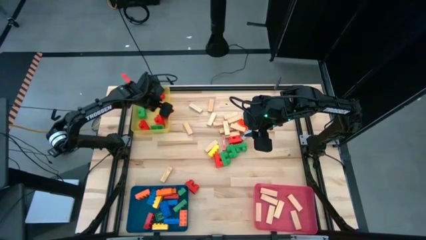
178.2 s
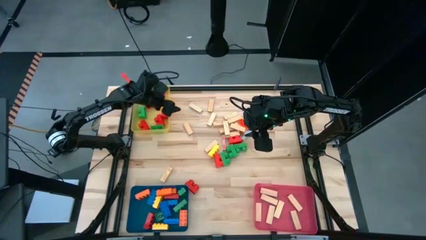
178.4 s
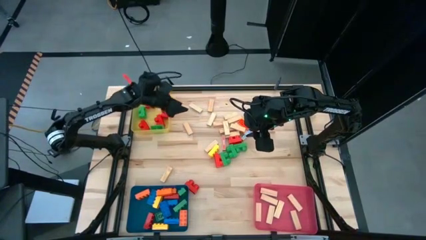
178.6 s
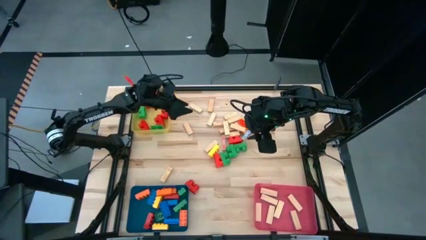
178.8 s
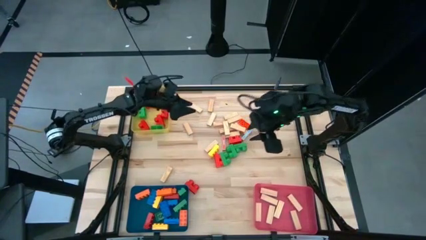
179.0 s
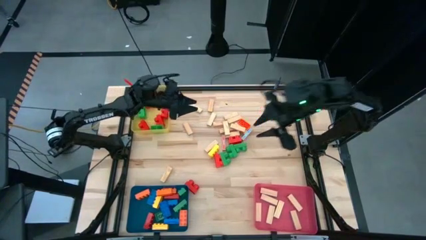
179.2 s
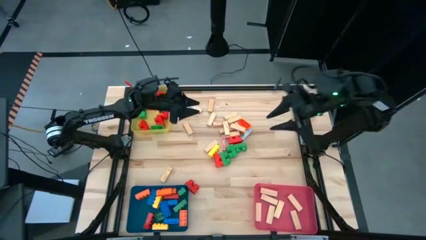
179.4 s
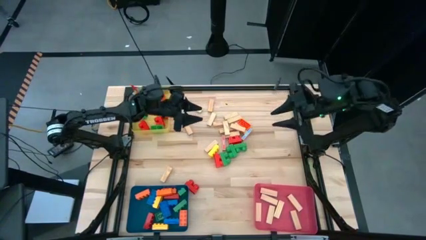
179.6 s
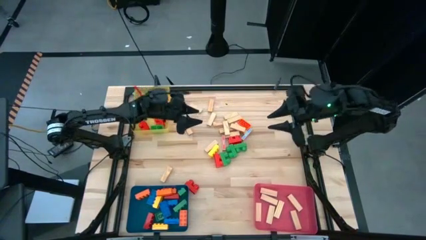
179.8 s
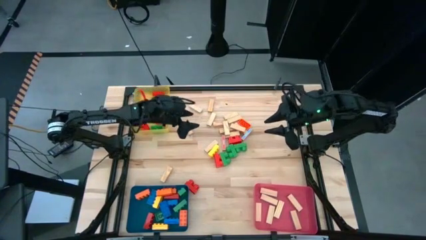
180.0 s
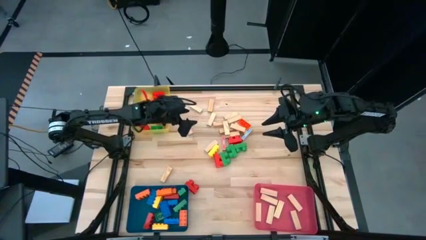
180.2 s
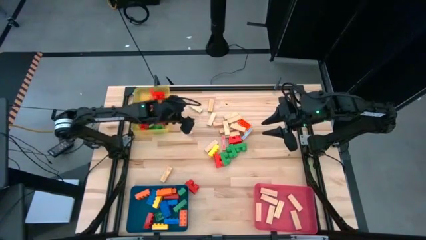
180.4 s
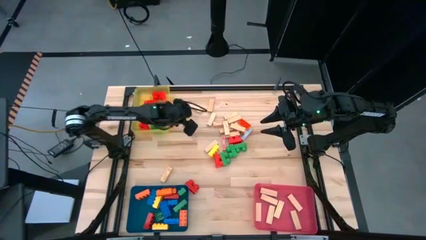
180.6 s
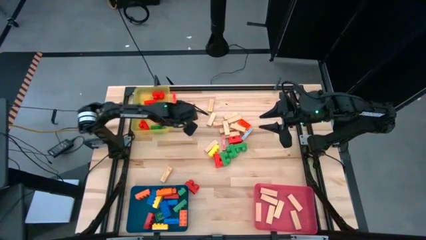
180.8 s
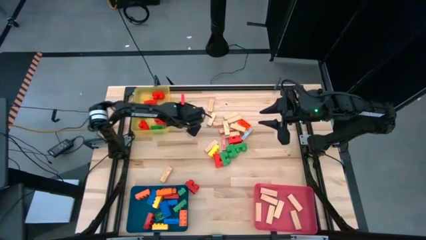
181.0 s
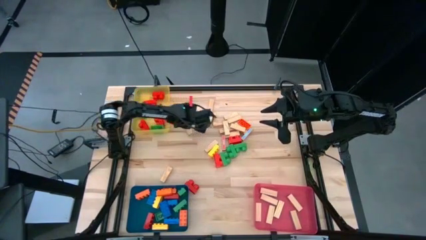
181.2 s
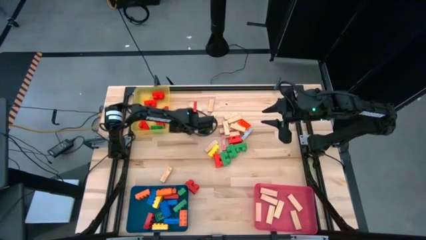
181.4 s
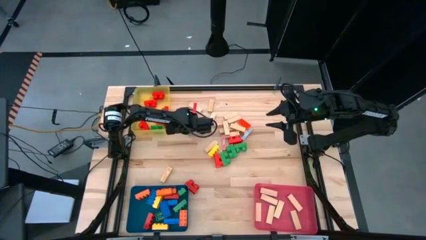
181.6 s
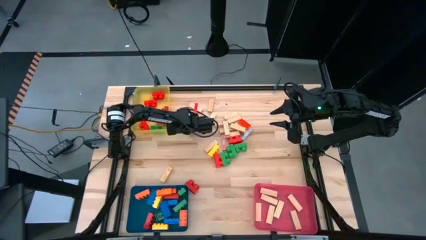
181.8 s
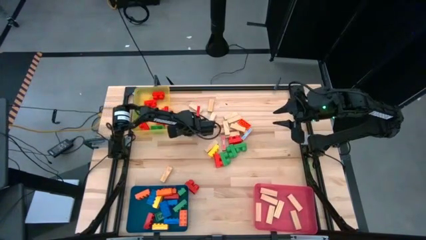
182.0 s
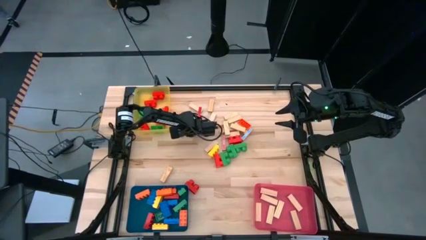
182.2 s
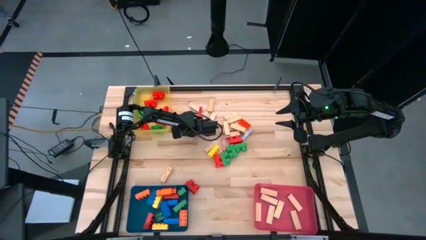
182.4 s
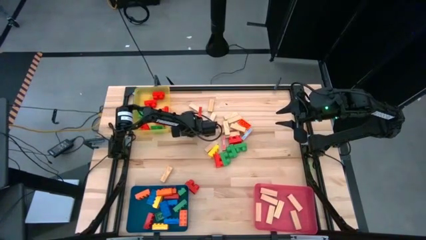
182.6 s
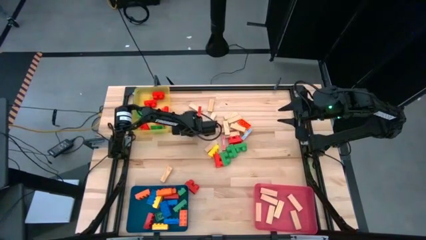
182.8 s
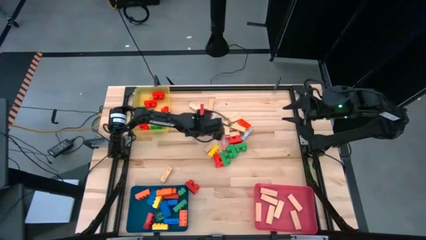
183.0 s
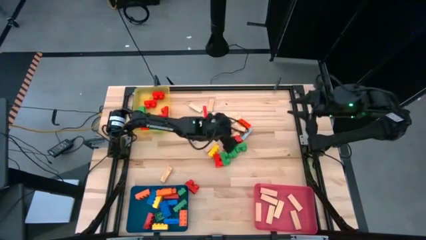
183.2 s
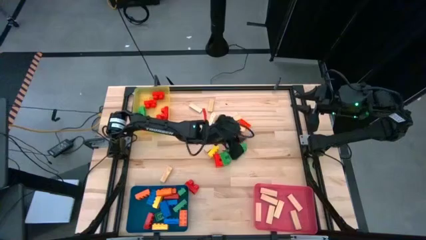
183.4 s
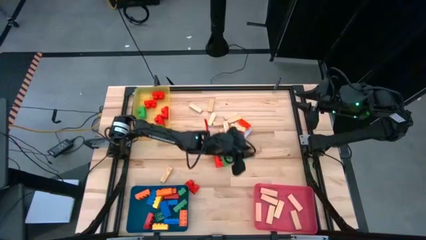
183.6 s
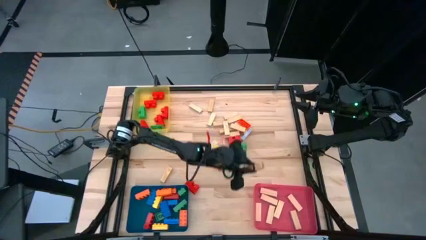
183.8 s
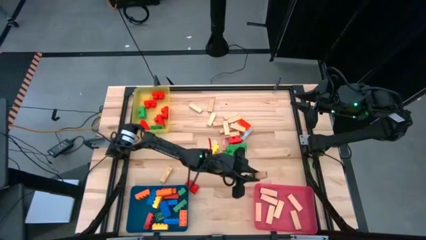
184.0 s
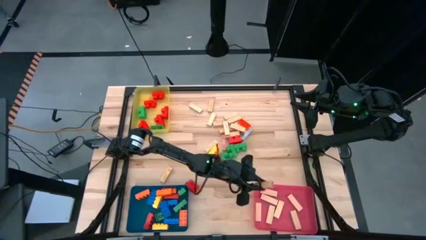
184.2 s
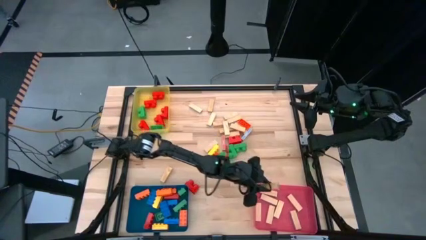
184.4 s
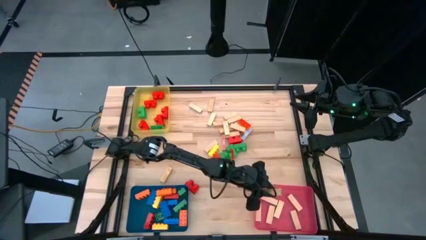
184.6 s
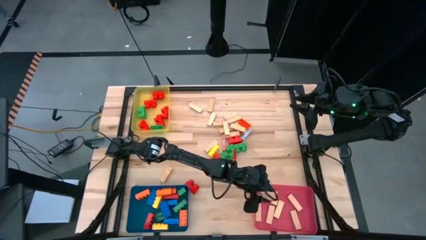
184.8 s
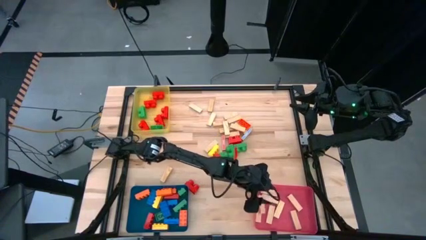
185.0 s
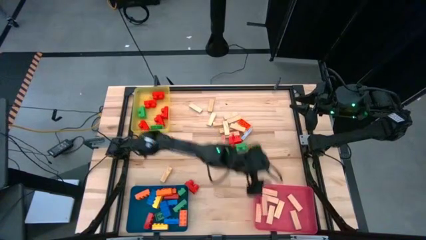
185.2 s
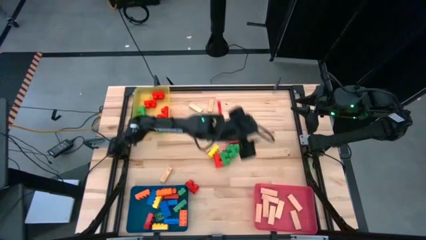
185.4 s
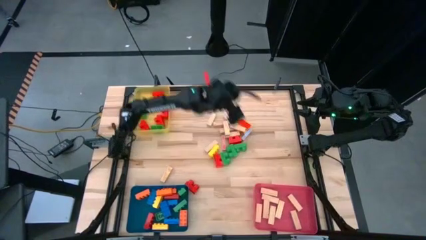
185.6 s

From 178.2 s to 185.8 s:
Task: Sort blocks by size
Put the wooden game piece into the red bin

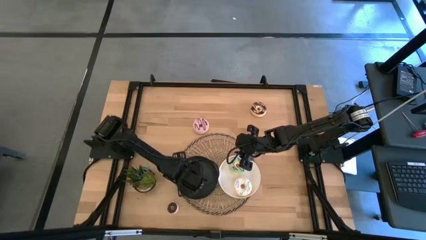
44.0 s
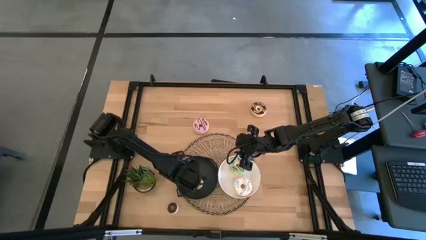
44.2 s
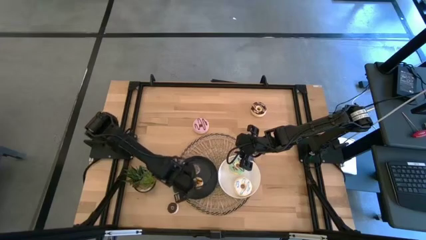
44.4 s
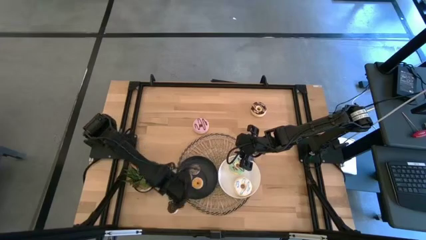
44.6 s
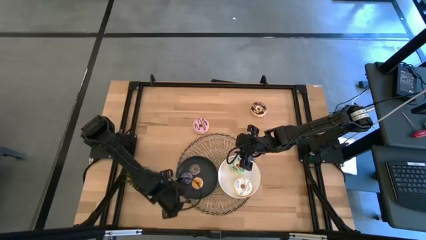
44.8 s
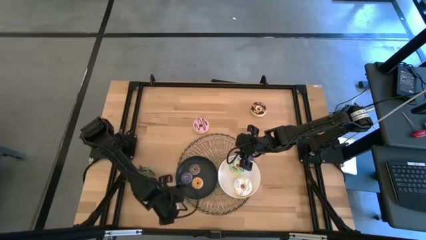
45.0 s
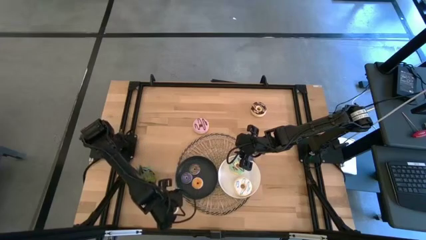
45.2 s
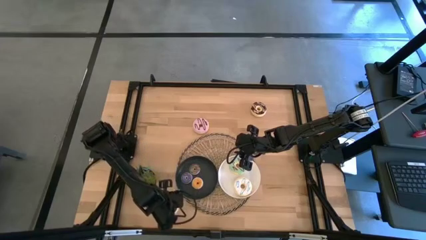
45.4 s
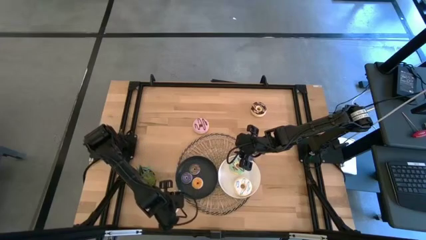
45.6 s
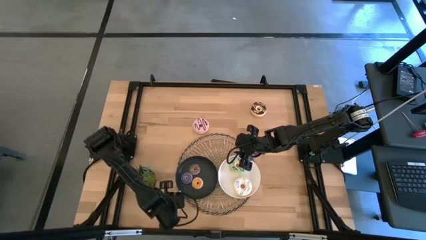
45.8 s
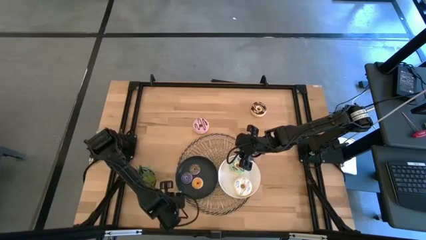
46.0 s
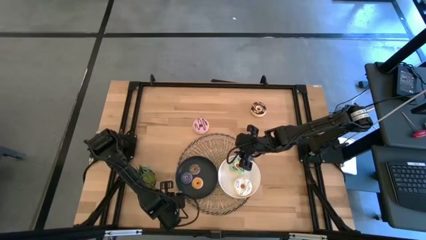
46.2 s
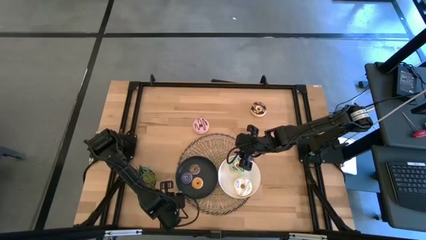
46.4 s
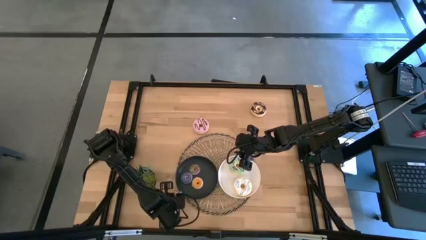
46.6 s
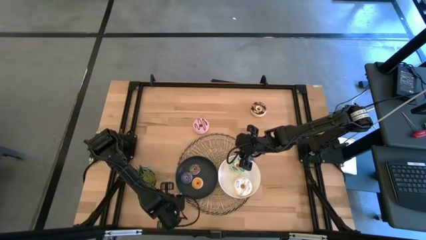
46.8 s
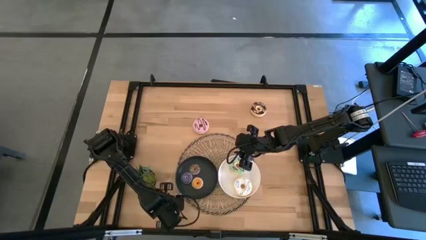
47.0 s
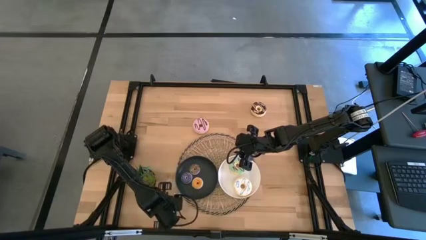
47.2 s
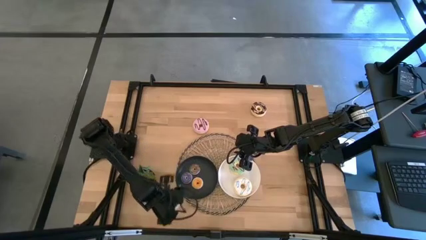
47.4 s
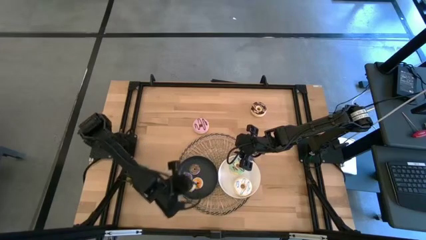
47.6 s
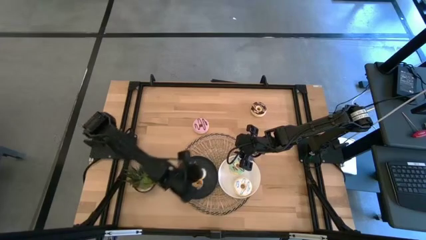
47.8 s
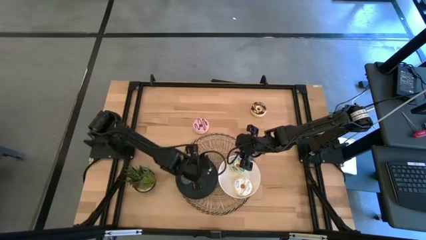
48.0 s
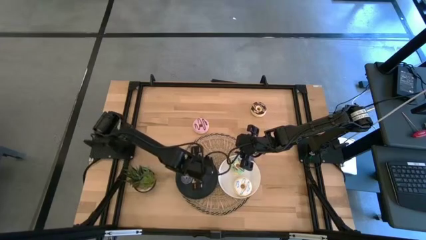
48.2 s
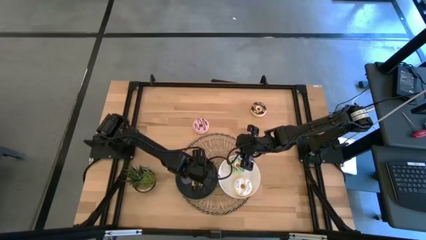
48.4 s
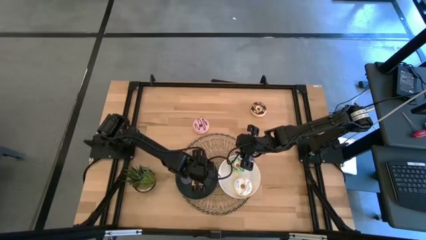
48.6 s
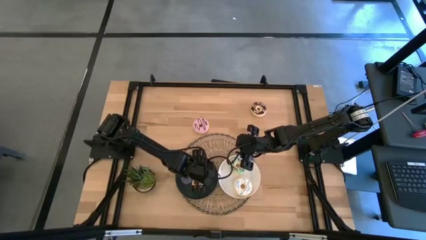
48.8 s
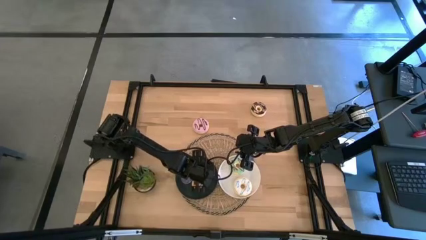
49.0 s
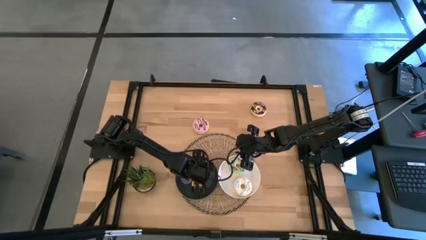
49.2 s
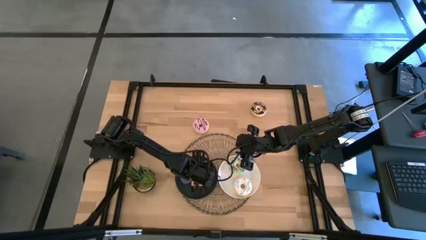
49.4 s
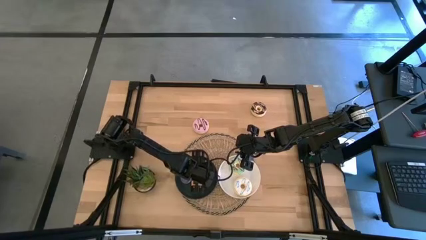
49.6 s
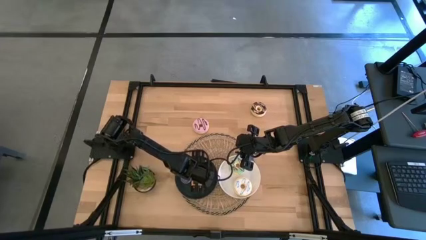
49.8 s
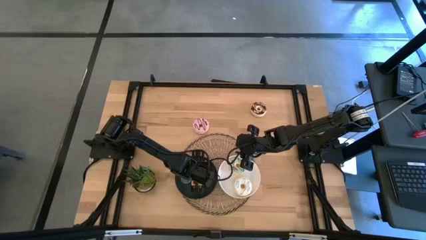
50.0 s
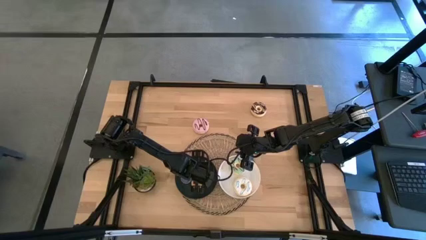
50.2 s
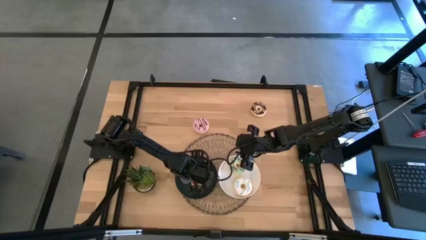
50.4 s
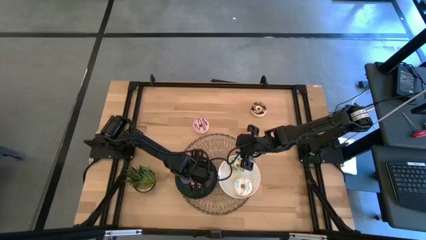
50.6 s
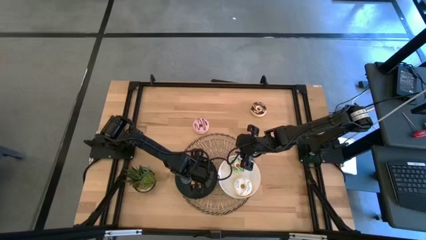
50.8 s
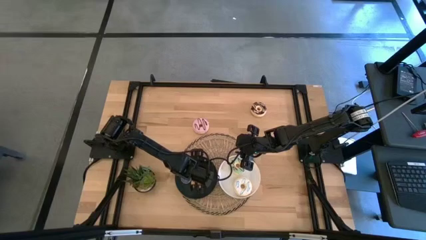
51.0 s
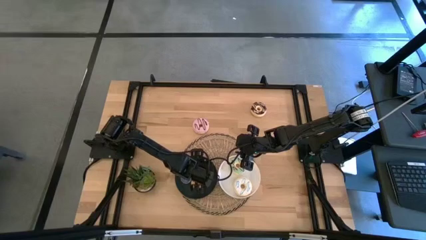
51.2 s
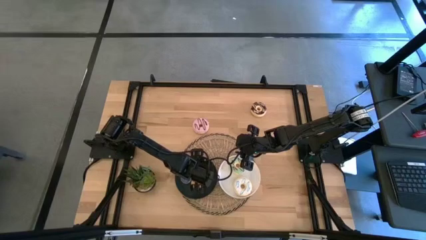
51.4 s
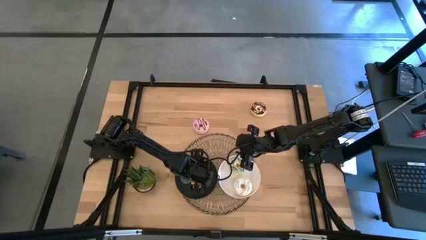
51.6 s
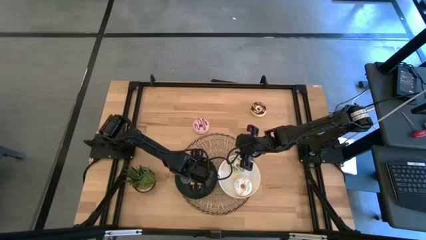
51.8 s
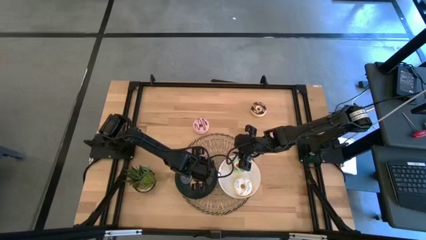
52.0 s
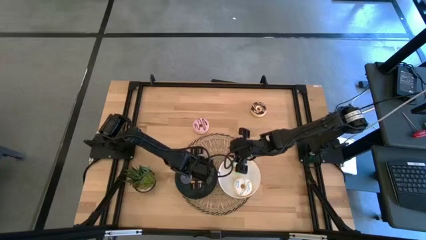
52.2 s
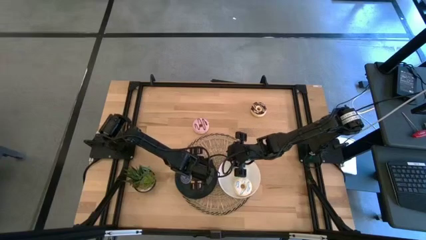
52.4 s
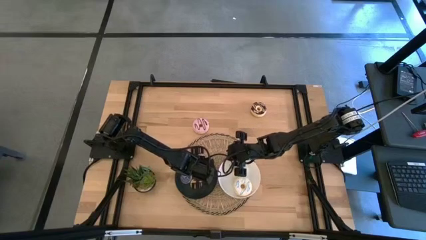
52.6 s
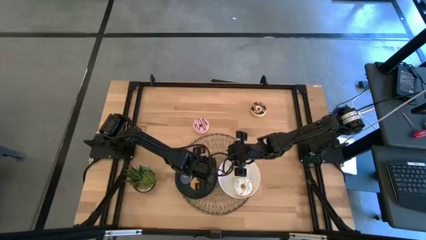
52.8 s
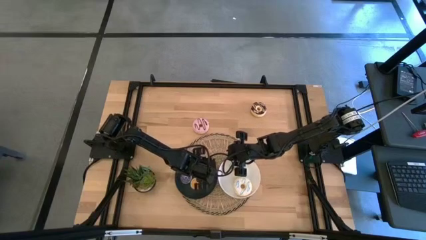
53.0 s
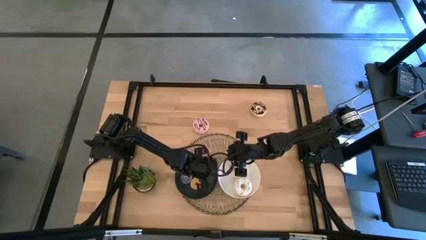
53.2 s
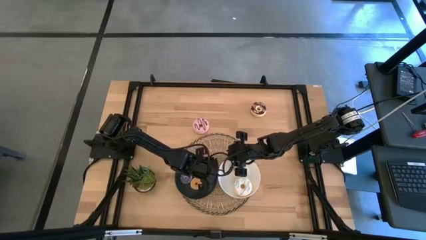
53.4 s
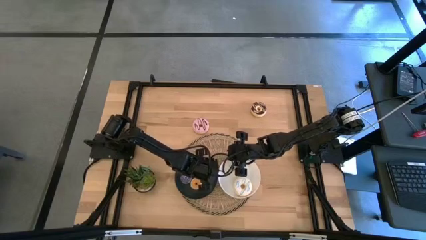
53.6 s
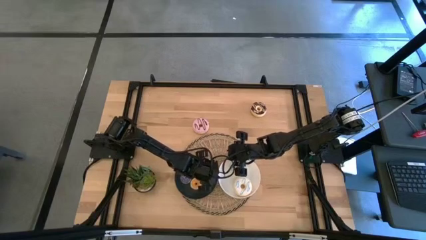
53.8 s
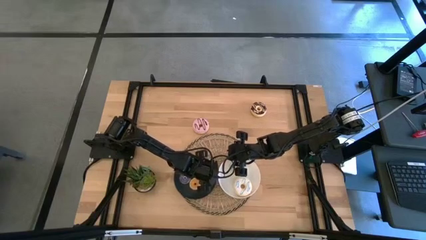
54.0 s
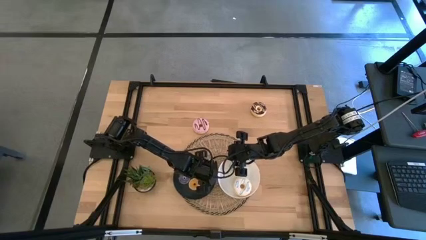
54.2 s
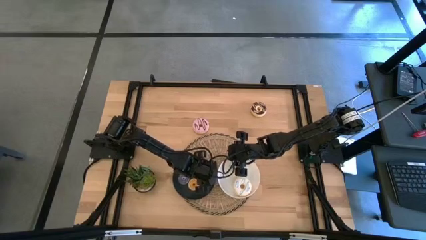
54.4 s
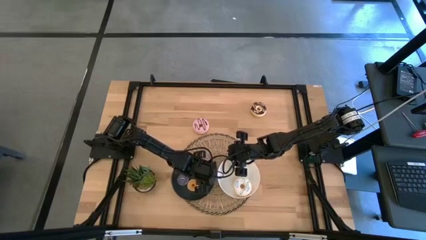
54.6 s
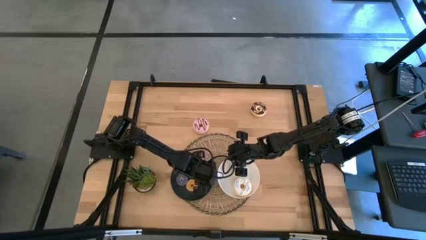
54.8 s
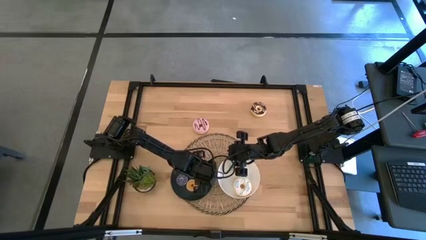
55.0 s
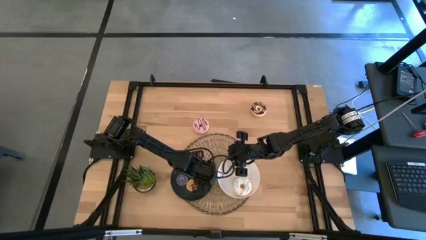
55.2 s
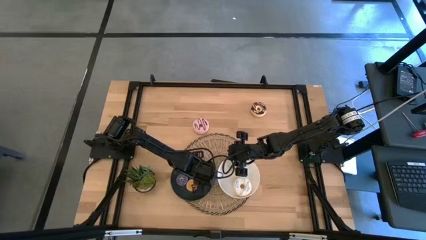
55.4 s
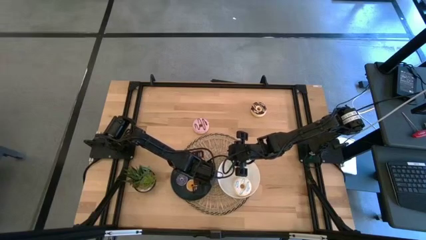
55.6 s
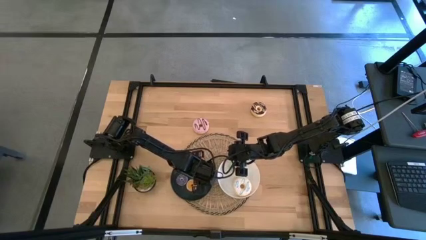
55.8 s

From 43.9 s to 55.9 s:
Task: Pick & Place donuts
Put the small dark brown donut on the black plate
